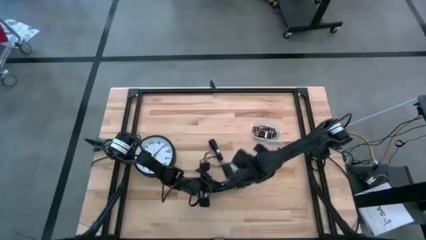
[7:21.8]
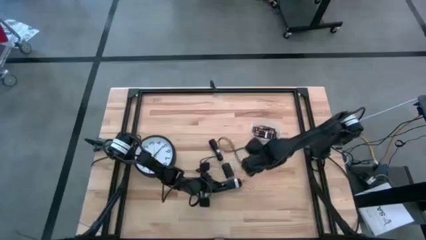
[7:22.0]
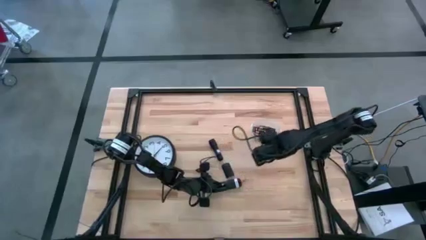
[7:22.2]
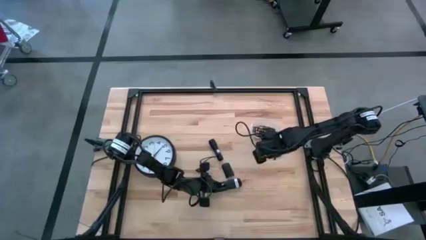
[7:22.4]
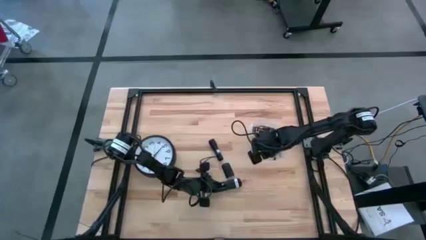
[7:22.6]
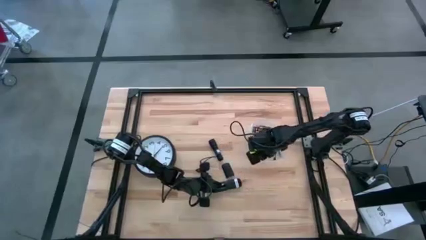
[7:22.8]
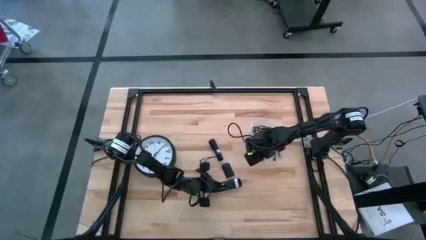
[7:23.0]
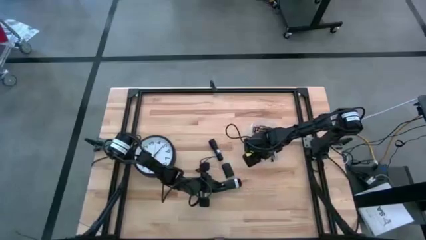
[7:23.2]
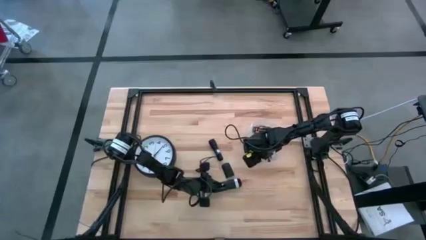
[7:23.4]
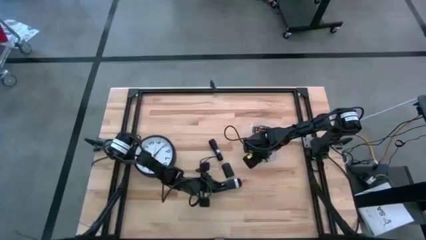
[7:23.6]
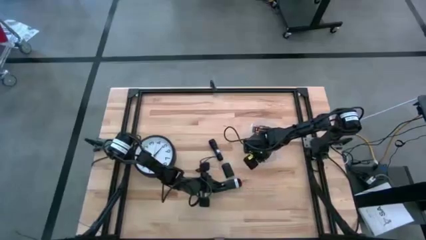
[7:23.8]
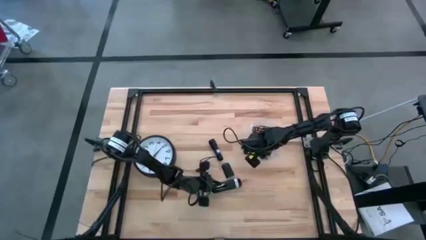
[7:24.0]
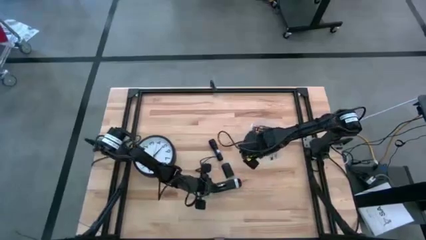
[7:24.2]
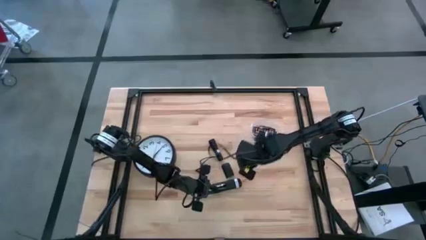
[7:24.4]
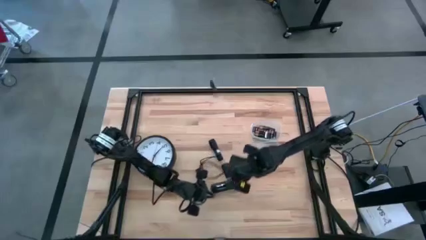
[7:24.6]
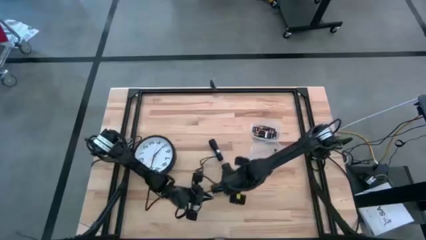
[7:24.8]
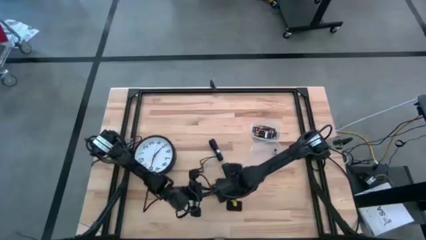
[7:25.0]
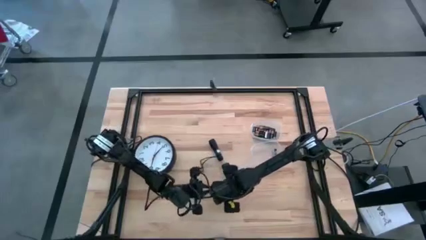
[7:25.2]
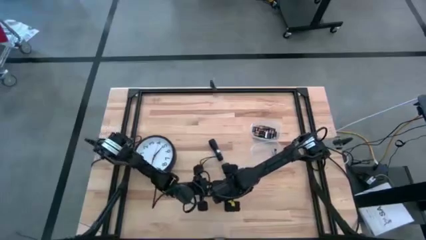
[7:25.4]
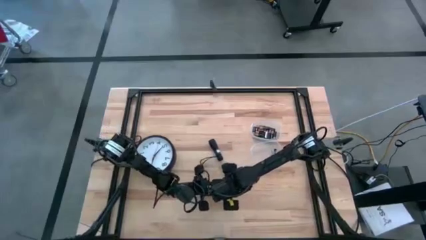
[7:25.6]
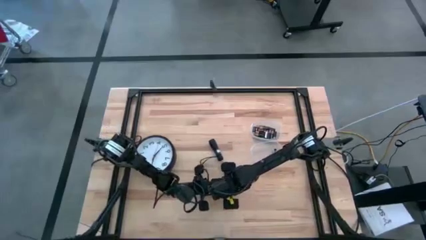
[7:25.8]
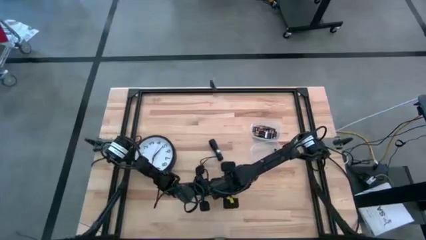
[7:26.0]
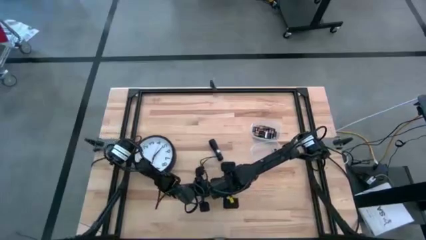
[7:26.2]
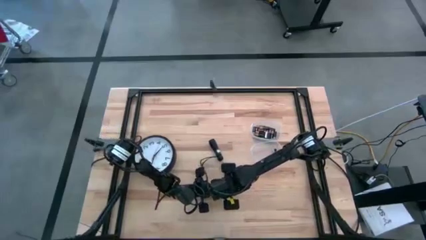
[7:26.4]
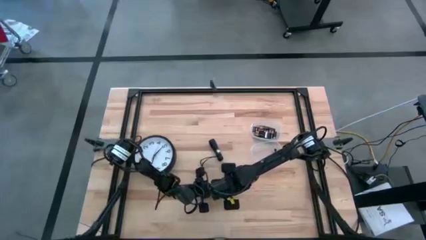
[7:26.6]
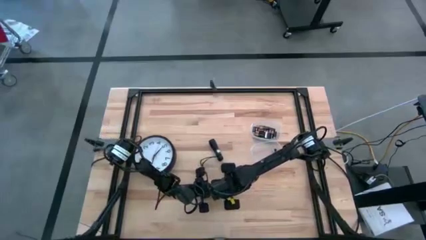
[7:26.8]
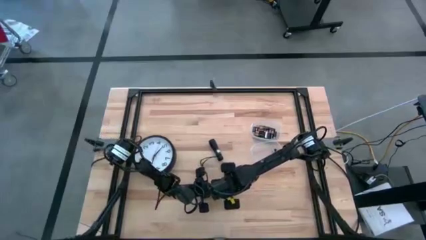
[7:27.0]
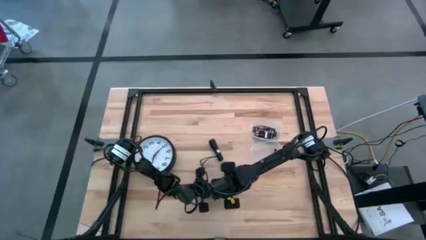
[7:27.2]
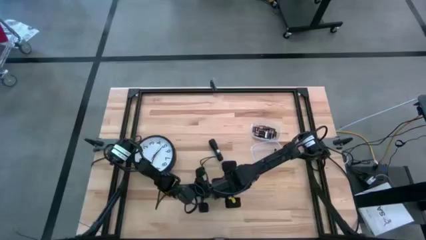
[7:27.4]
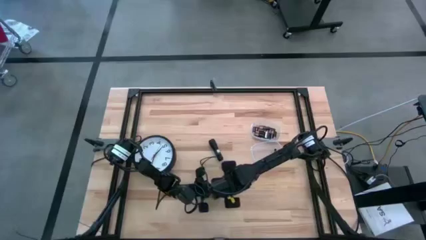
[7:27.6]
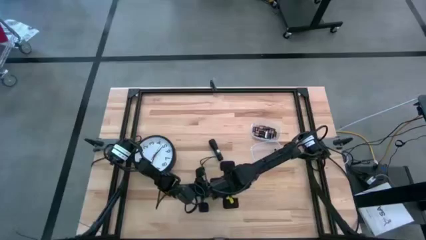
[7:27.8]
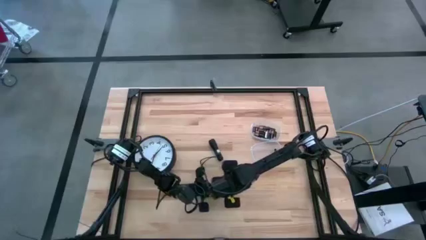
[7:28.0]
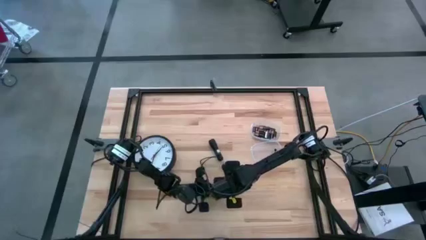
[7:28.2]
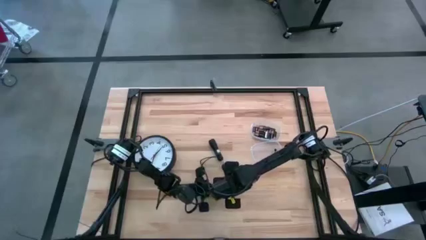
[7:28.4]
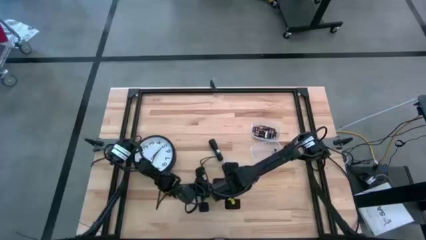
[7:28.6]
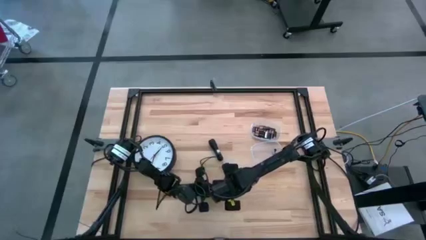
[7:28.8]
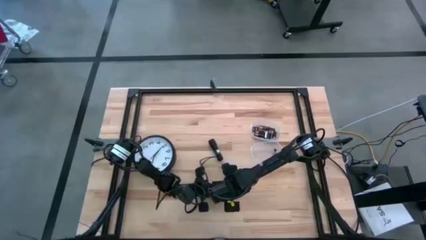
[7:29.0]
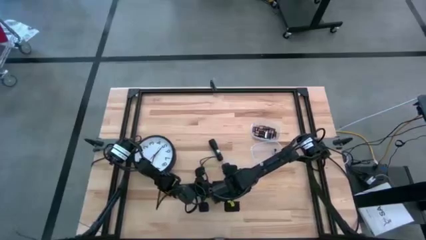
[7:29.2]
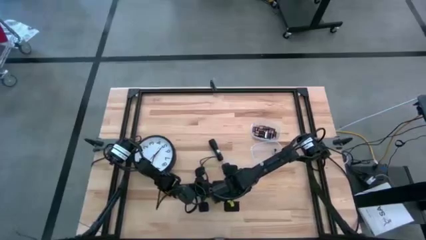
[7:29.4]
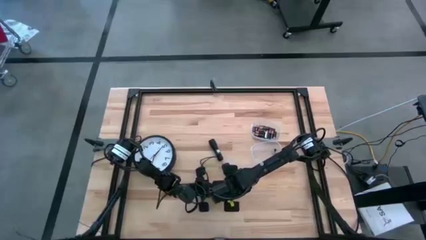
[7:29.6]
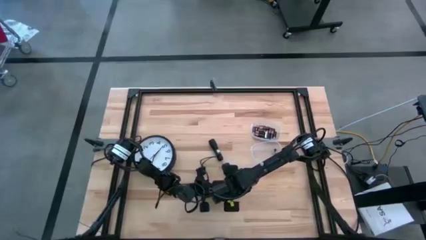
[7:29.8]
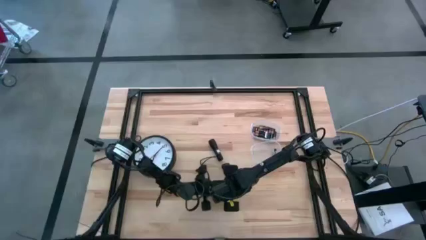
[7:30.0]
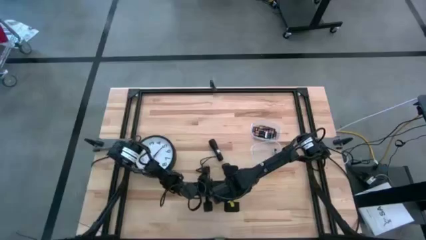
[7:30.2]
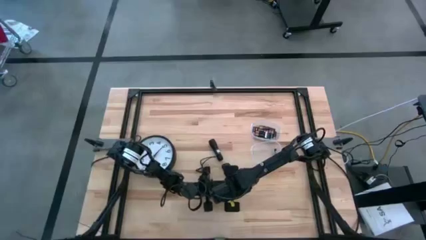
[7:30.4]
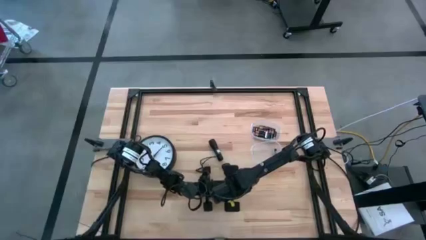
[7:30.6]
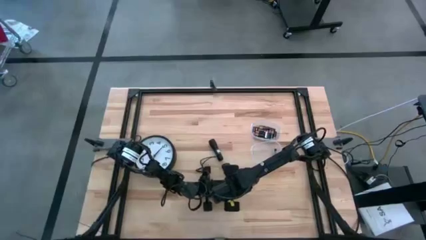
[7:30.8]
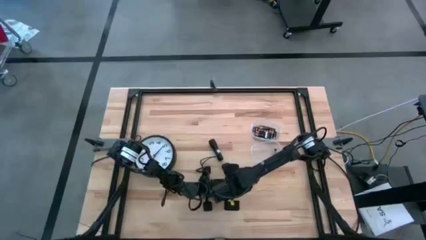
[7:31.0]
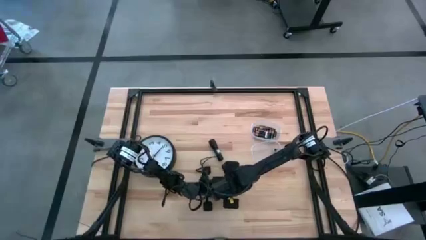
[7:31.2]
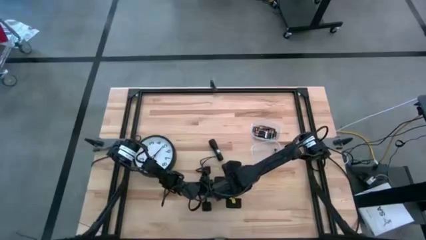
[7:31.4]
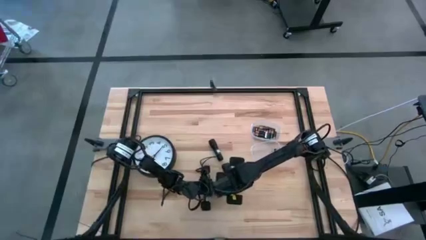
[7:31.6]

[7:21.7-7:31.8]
Task: Insert battery
Insert the silver battery into the remote battery compartment

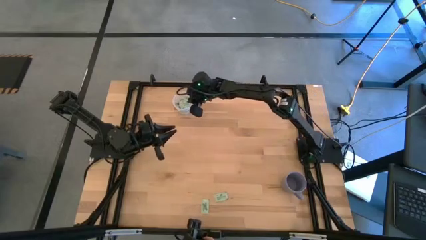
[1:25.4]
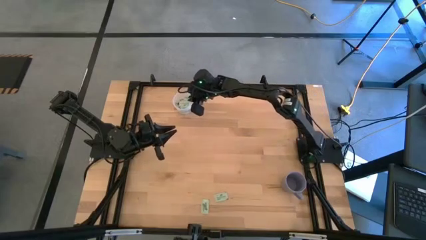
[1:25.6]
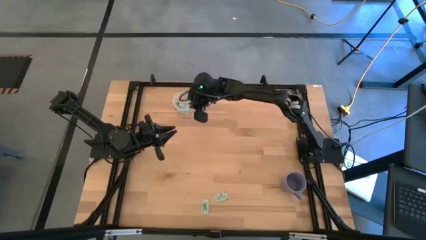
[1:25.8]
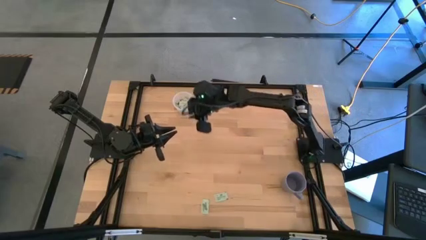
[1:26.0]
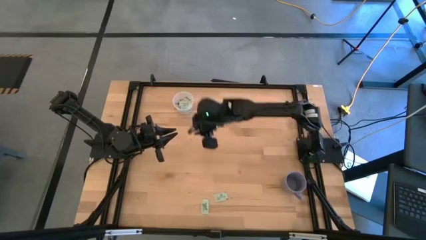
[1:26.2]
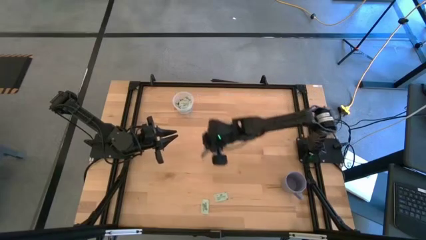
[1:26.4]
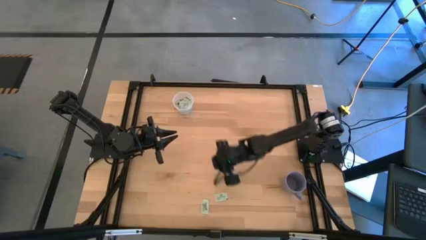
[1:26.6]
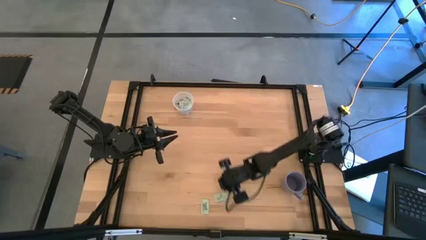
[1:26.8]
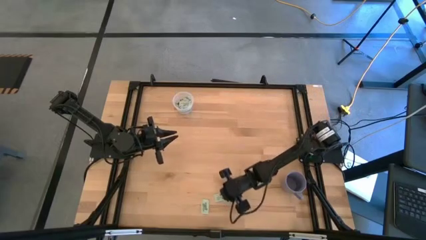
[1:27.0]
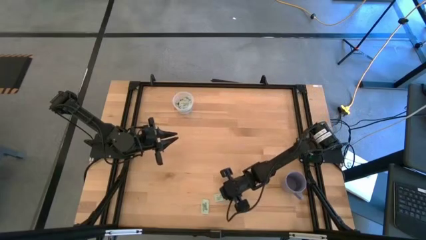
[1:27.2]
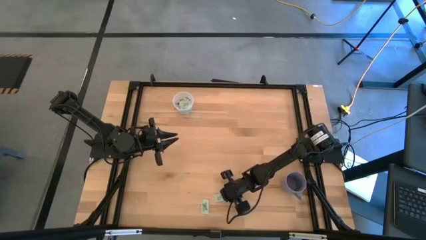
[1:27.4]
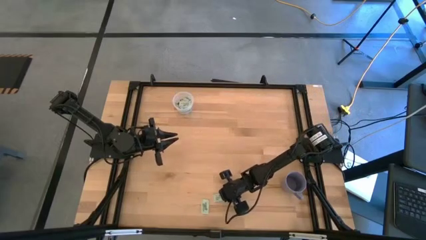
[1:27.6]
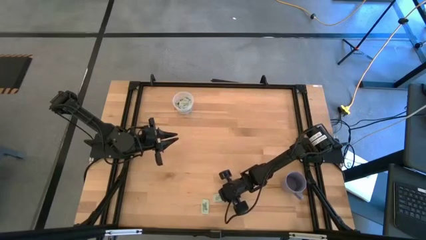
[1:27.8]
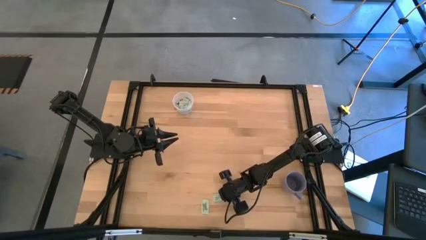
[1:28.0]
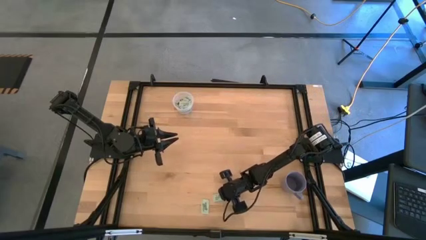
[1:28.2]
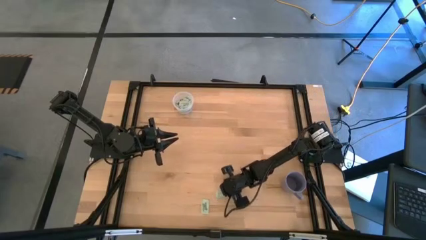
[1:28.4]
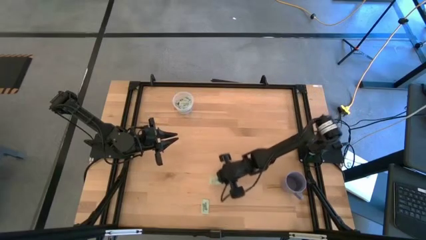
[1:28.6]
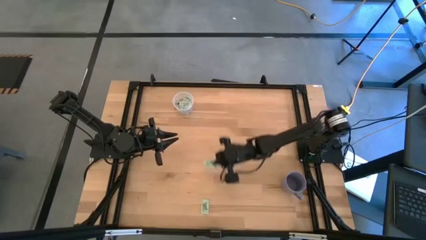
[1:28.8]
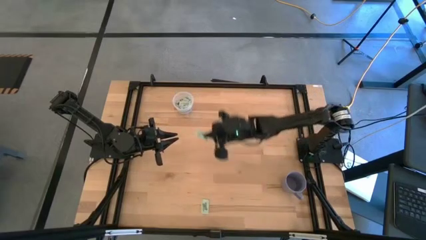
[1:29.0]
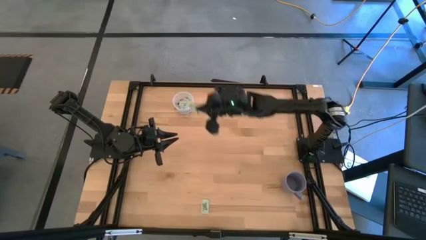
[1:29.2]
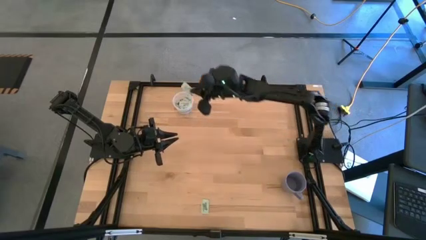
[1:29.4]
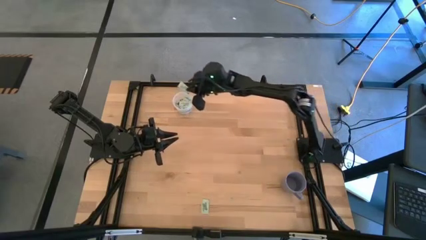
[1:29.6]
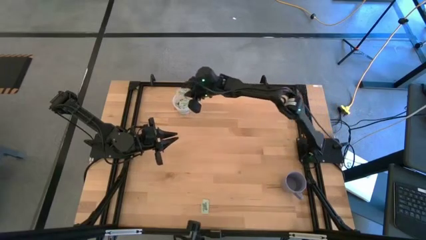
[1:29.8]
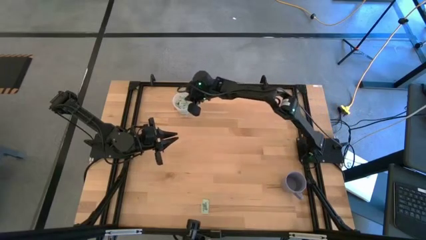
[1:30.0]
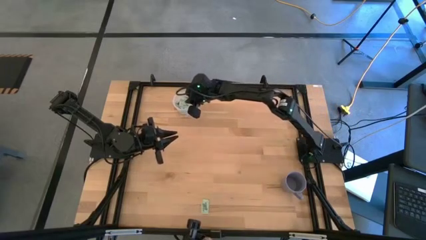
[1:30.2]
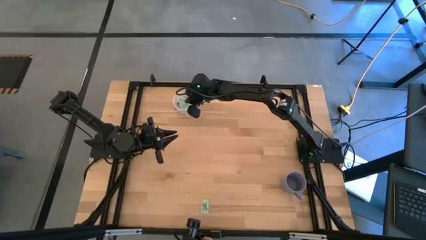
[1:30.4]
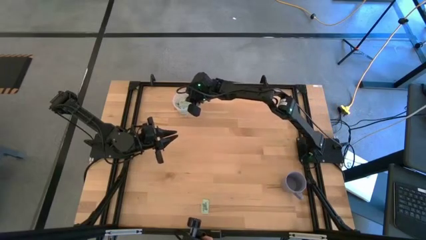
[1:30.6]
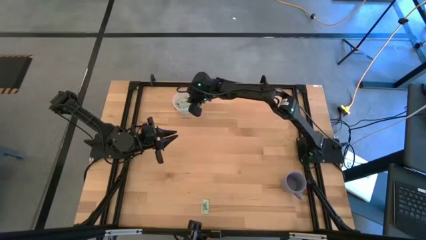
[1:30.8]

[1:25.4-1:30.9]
Task: Pick and place items into bin
Put the stevia packet into the transparent bin

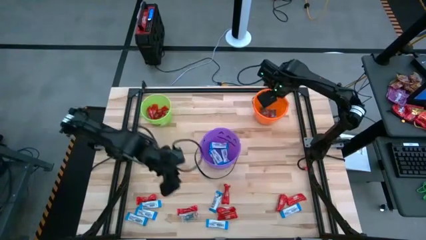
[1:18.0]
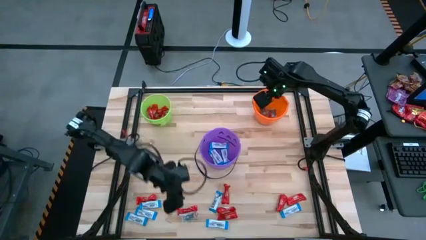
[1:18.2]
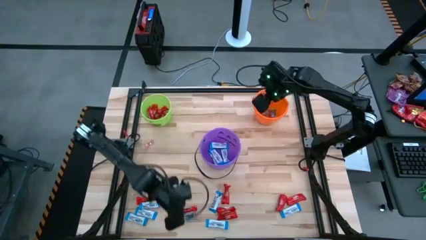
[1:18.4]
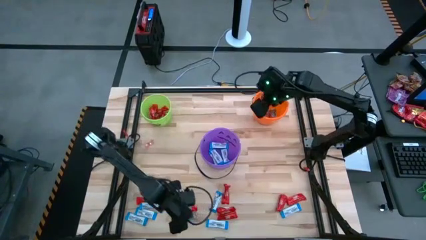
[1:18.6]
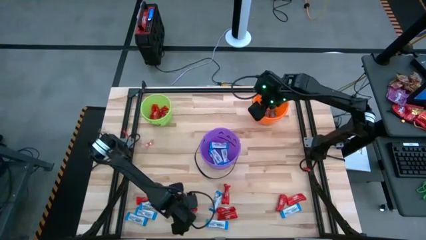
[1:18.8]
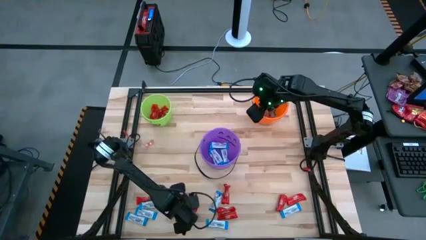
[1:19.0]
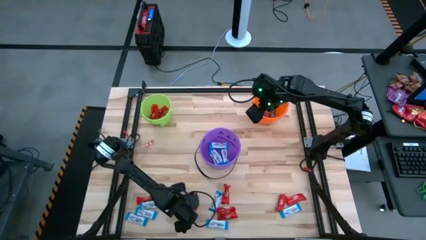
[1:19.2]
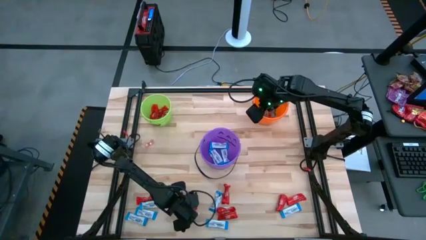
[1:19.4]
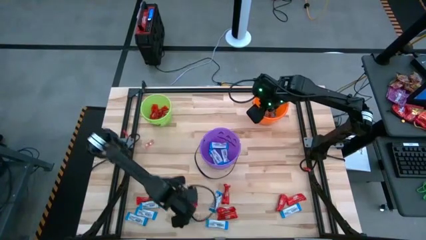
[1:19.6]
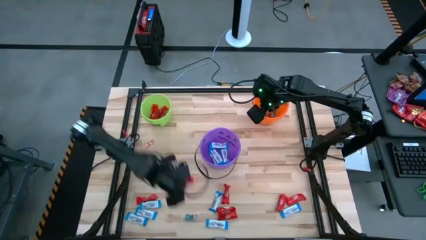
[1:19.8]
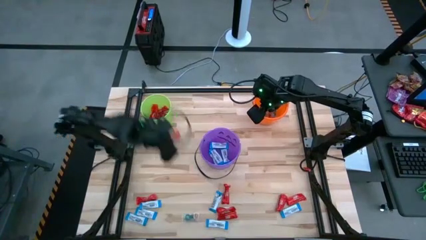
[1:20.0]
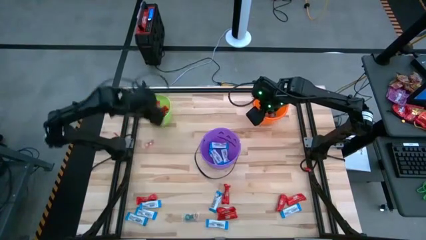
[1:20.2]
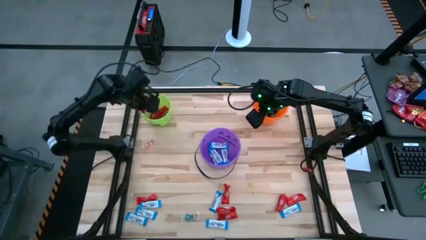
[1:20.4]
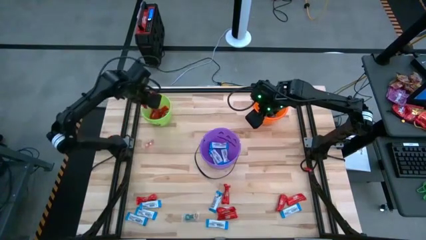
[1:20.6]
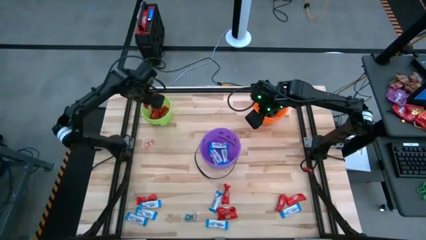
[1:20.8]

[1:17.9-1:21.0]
Task: Sort candy by brand, put in halloween buckets
Put the red chocolate into the green bucket
